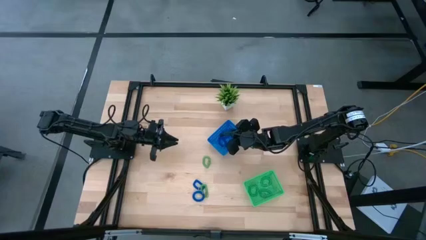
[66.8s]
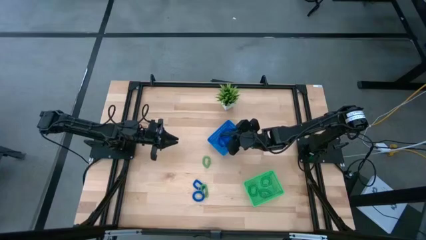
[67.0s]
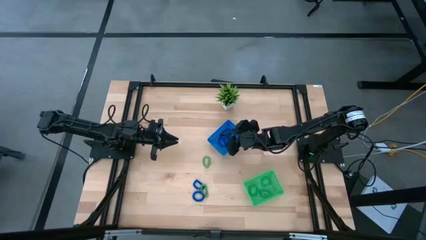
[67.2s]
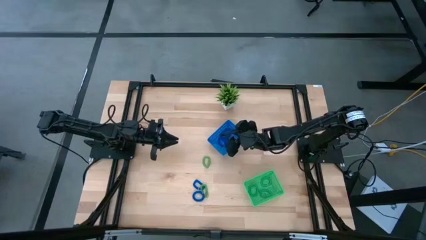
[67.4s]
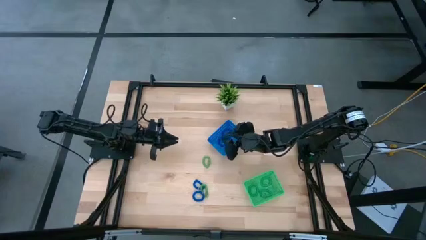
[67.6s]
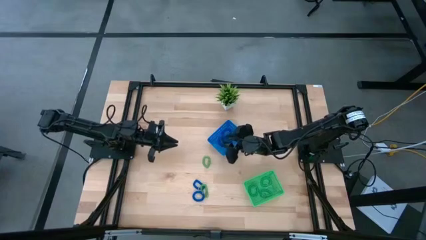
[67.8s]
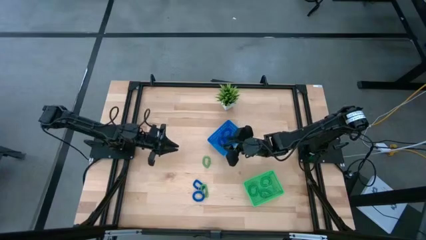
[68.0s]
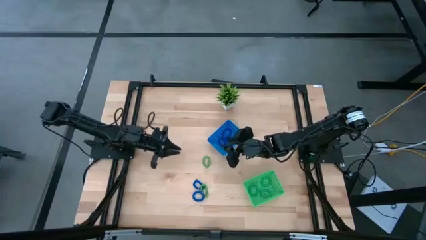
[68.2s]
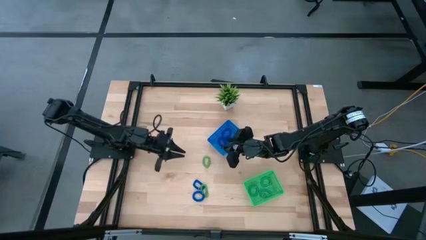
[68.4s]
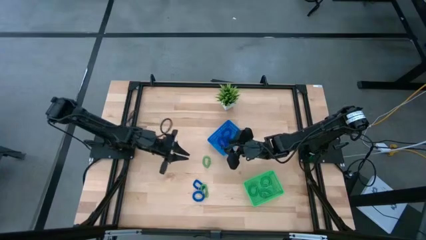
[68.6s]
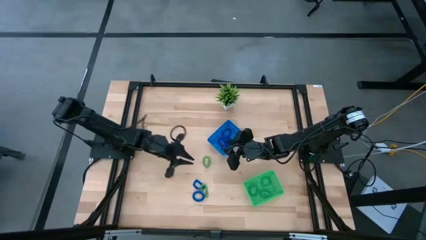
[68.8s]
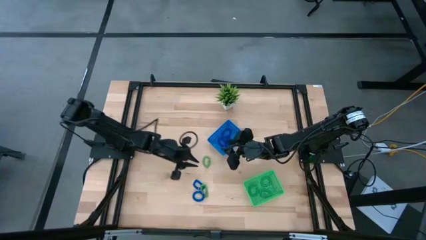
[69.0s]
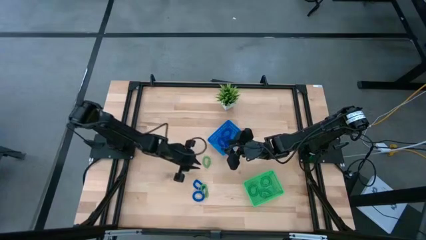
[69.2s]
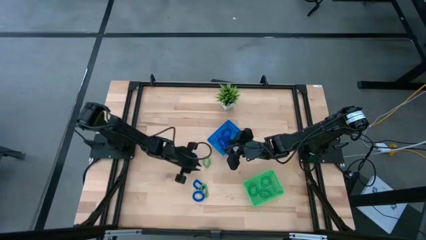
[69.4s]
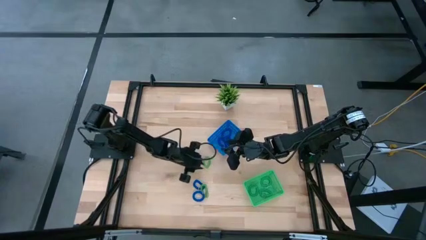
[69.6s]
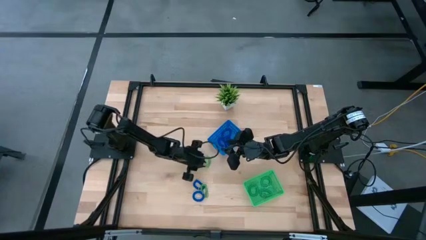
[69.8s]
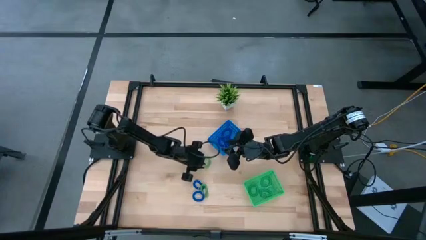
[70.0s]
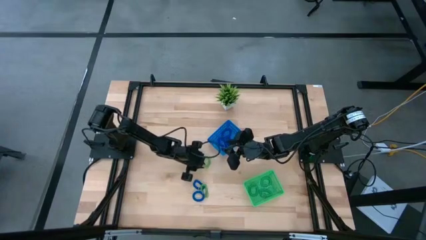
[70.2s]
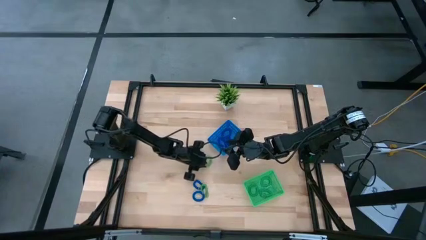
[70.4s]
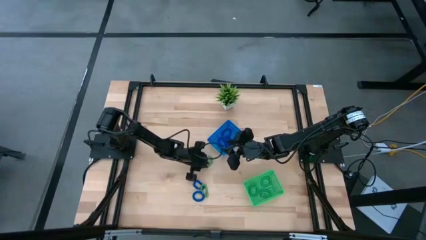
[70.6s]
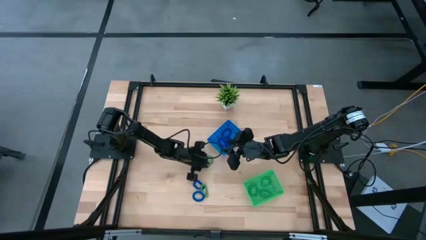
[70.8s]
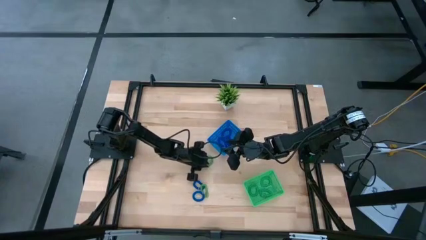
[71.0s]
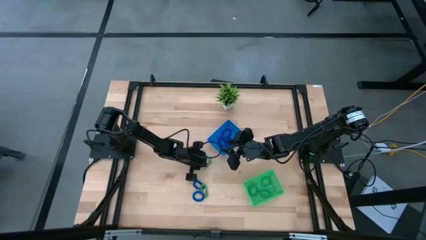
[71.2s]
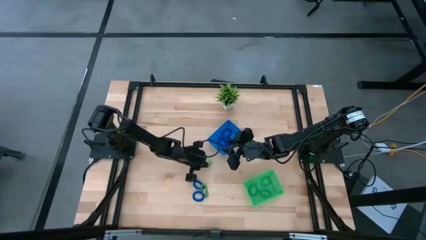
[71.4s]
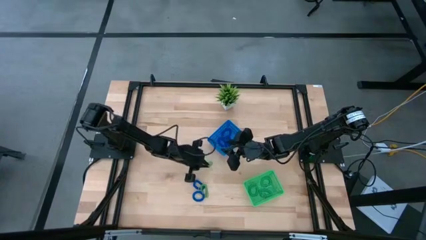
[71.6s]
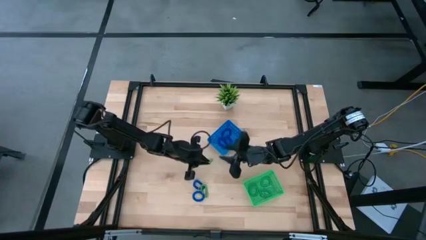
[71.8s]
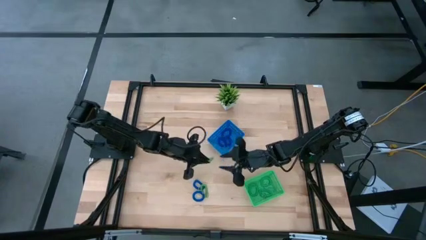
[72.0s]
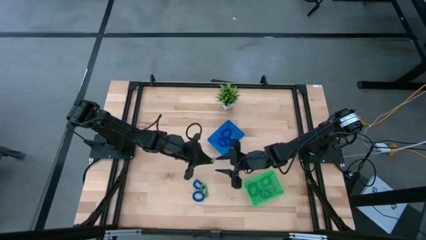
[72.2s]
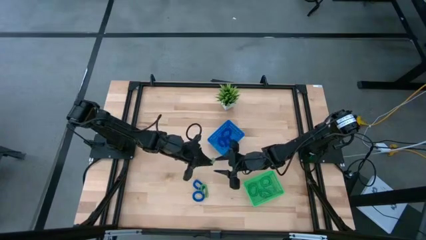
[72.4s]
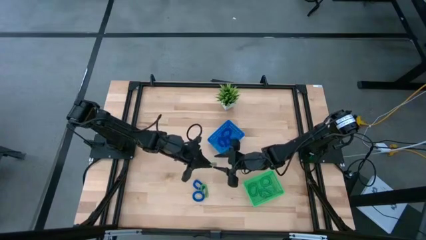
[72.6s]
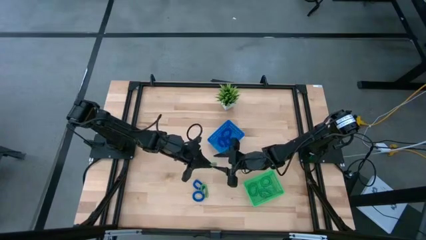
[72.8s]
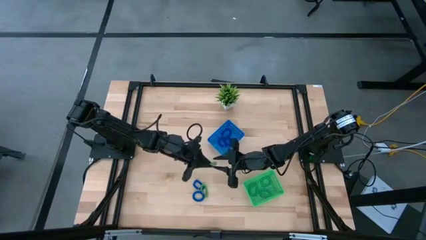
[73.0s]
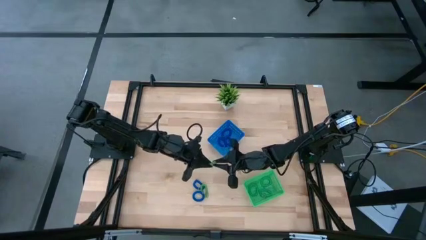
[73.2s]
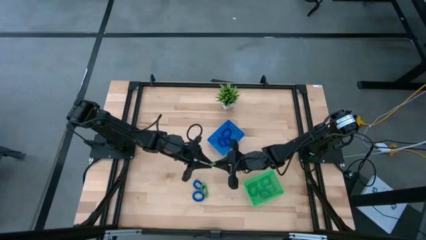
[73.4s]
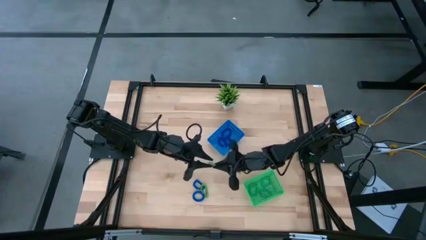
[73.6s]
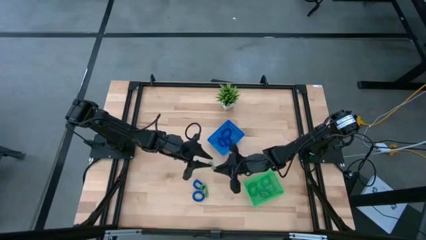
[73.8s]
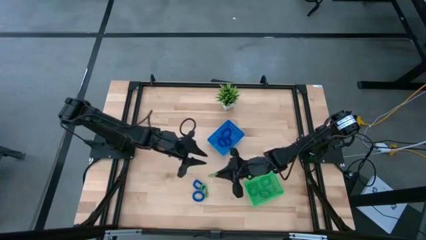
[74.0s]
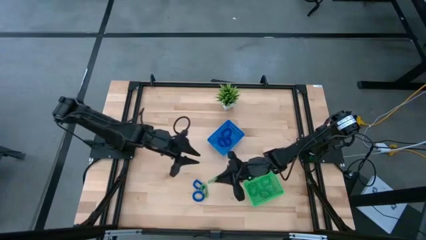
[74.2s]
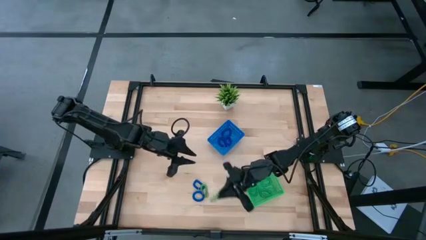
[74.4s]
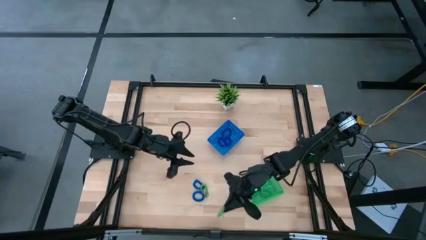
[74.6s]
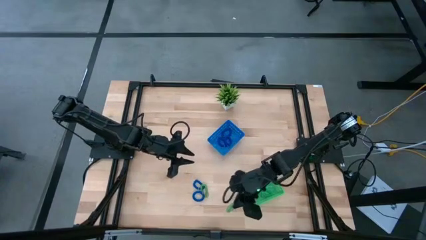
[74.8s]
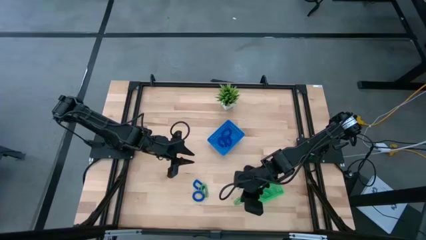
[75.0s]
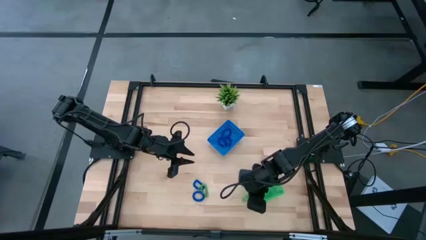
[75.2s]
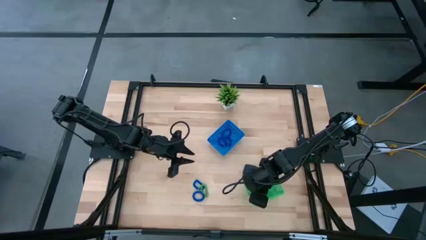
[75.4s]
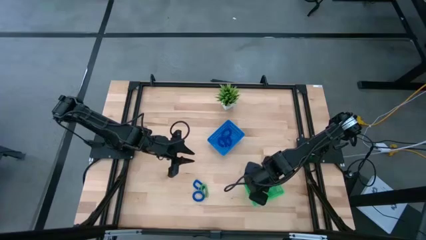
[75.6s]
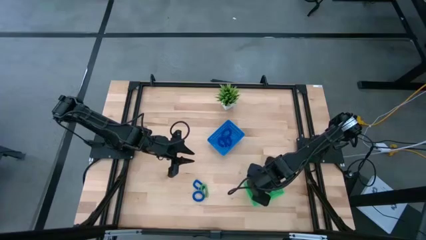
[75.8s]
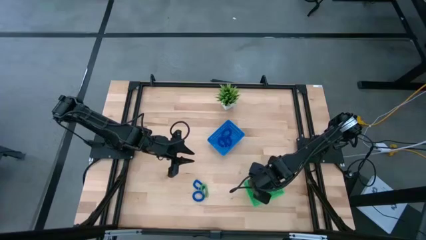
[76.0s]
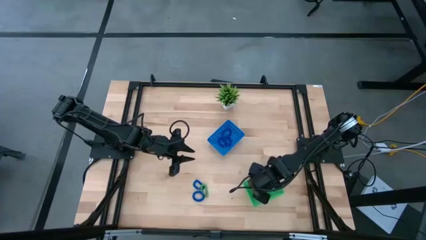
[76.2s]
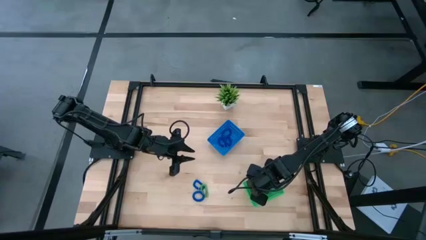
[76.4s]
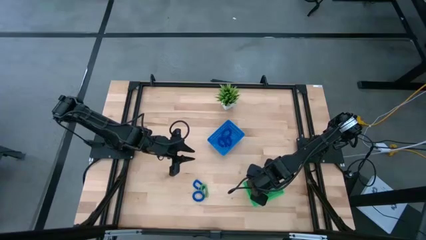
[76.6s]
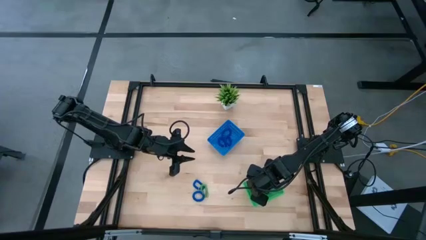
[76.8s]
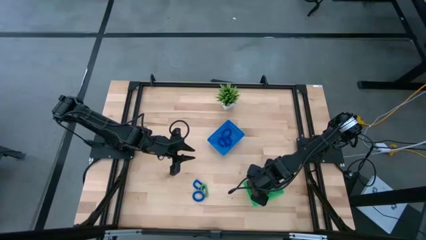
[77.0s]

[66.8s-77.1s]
Task: Sort spring keychains
Put the green spring keychain into the green bin
